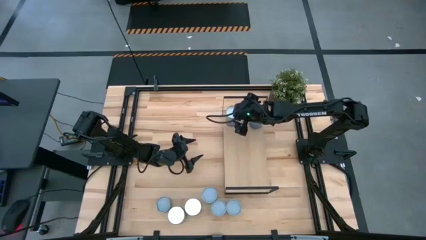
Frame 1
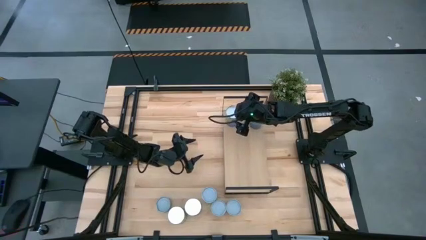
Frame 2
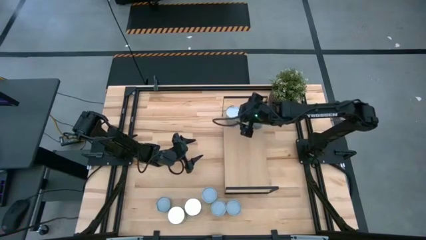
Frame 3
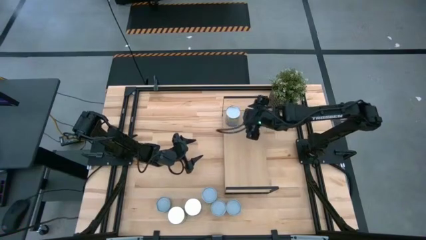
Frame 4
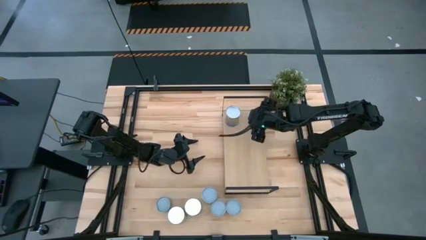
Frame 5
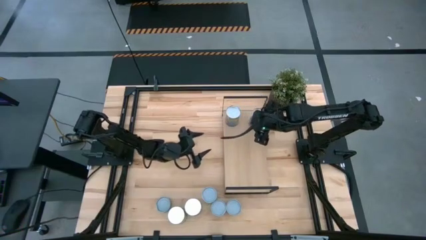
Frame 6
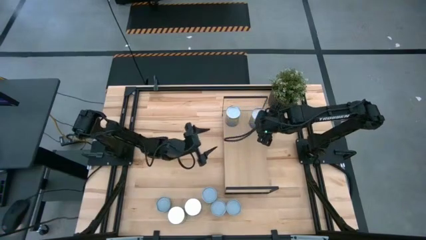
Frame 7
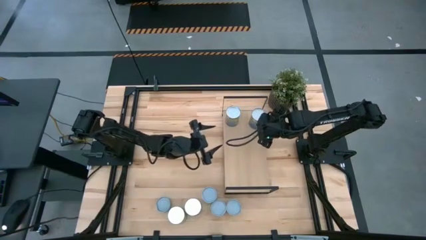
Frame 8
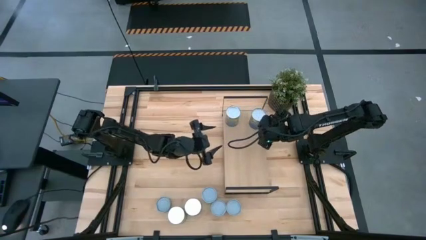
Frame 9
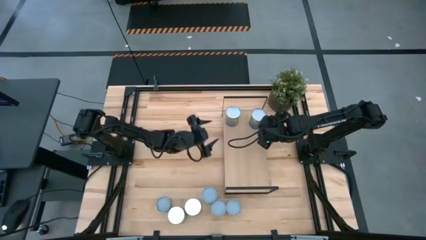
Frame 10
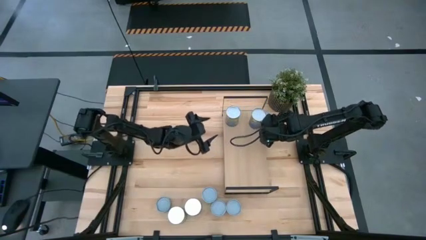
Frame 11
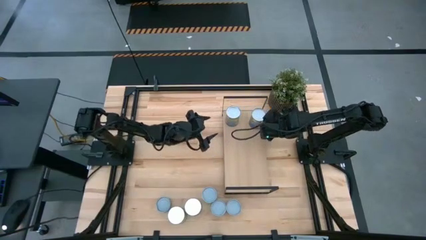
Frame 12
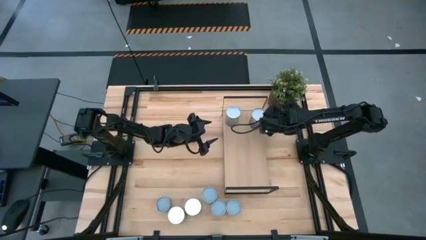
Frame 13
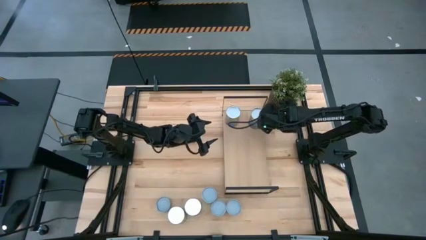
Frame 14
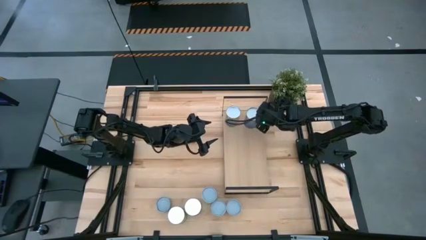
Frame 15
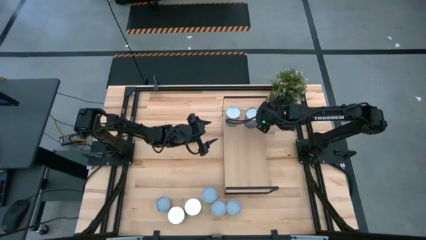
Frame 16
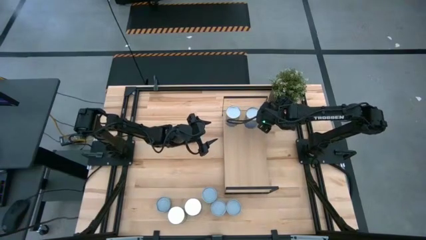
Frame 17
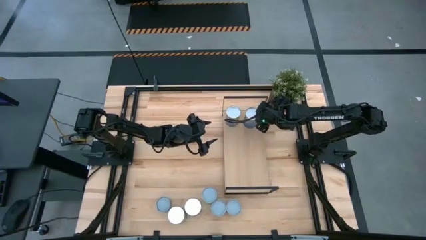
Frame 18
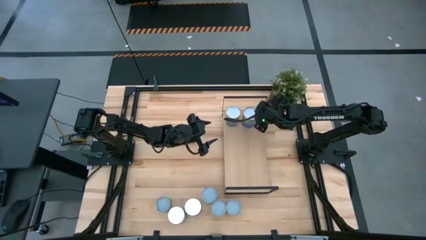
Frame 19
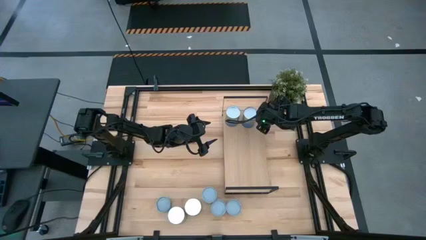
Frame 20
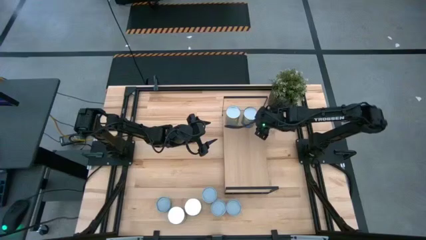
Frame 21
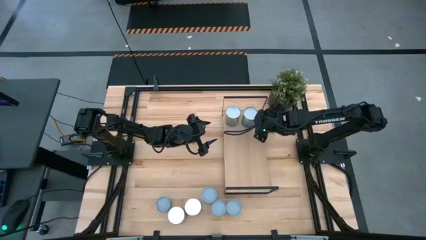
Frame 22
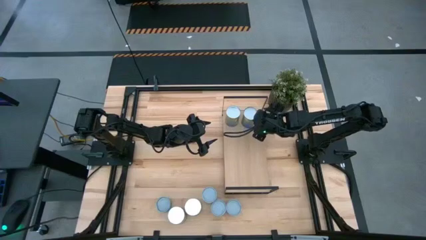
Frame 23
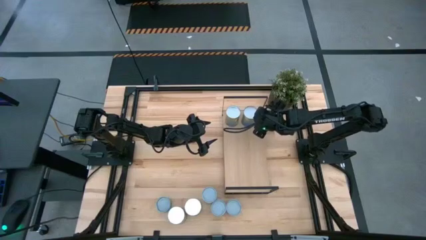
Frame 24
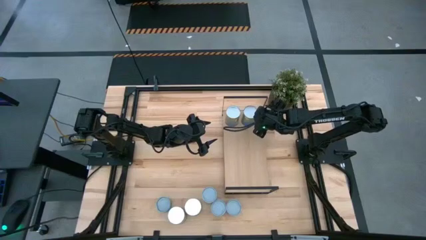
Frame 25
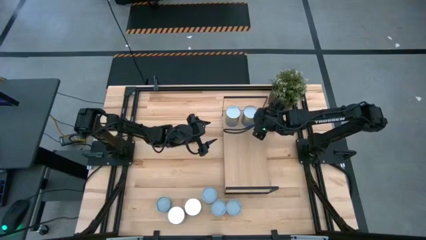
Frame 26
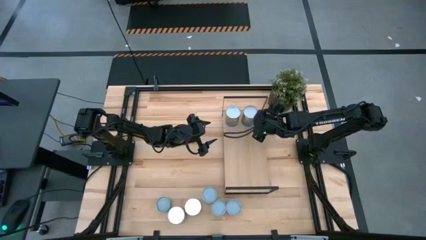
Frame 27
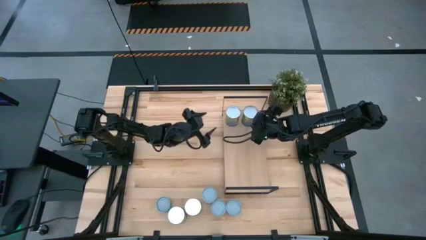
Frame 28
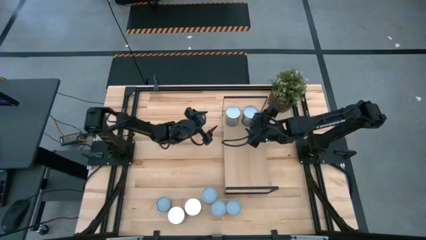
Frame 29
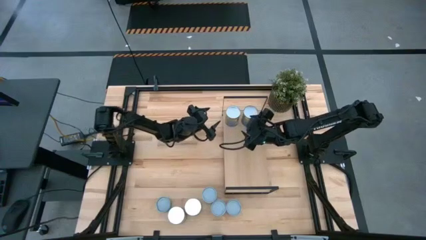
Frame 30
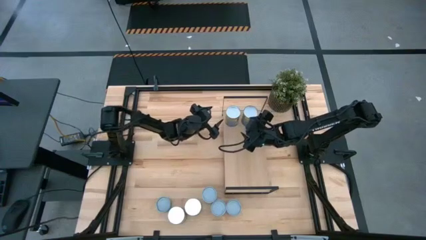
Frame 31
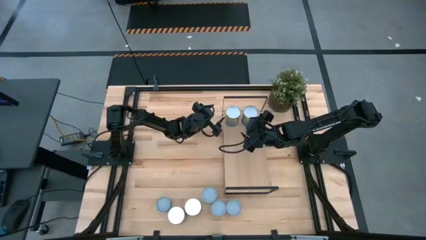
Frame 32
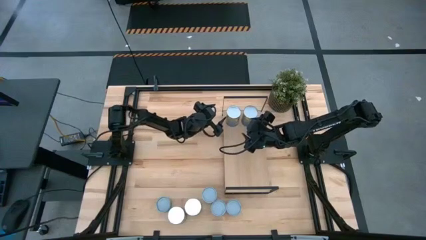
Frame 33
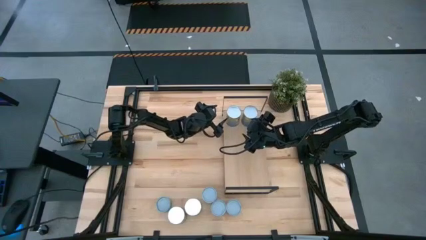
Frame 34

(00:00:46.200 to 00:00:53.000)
Task: Pick and place cans onto a shelf
Adjust the cans on the shelf

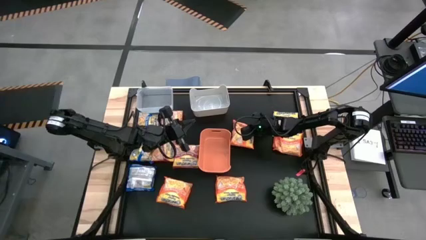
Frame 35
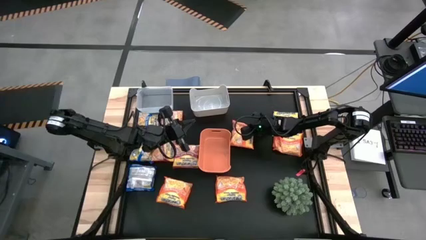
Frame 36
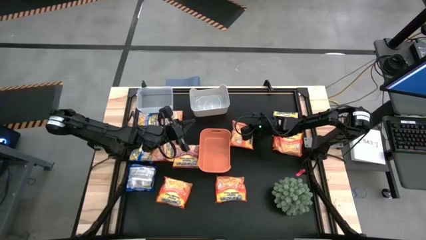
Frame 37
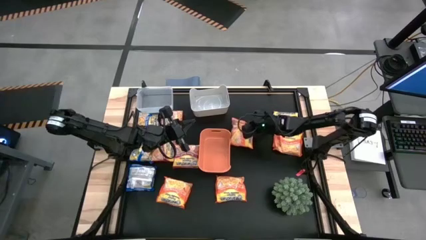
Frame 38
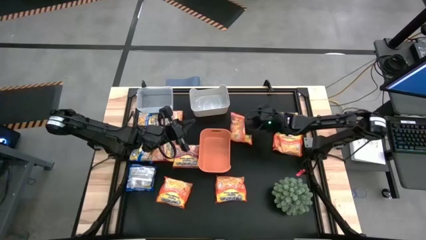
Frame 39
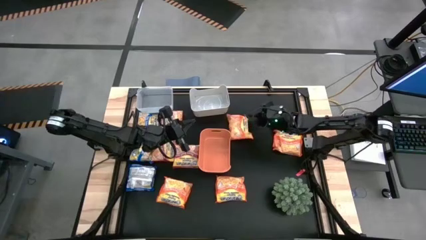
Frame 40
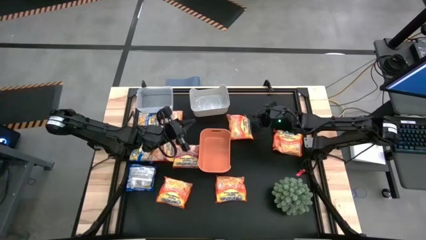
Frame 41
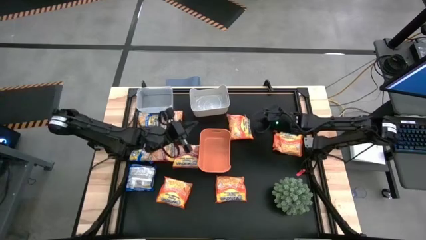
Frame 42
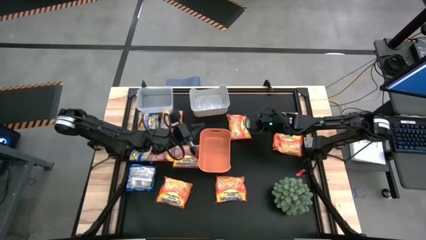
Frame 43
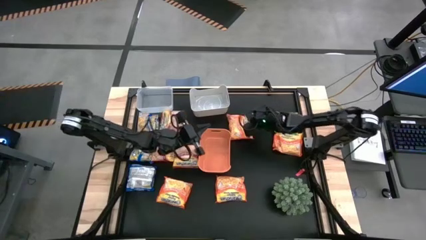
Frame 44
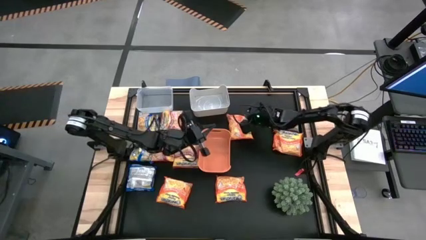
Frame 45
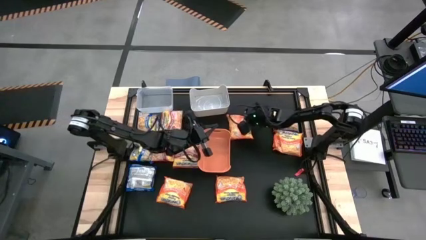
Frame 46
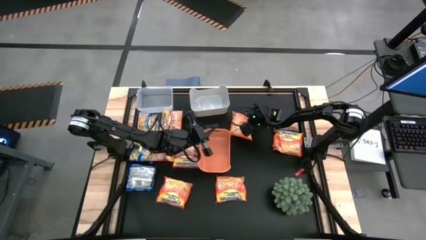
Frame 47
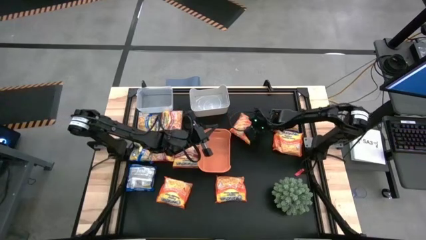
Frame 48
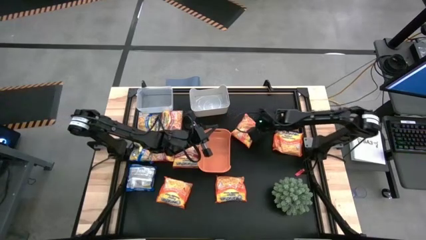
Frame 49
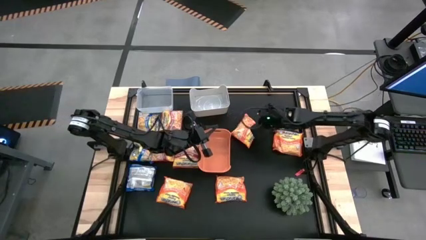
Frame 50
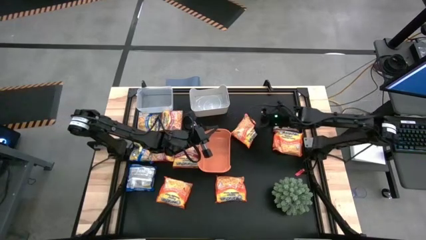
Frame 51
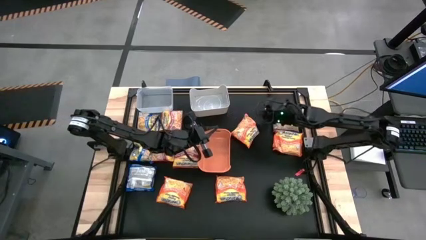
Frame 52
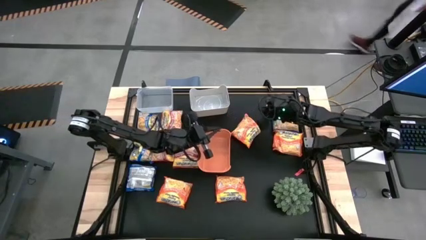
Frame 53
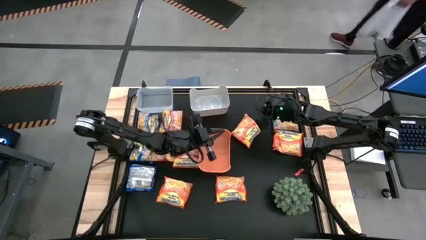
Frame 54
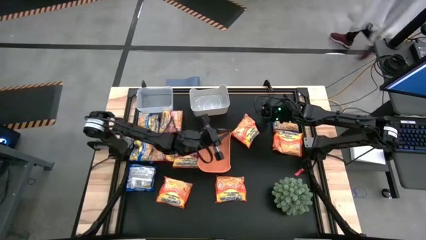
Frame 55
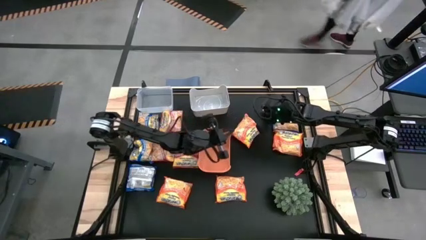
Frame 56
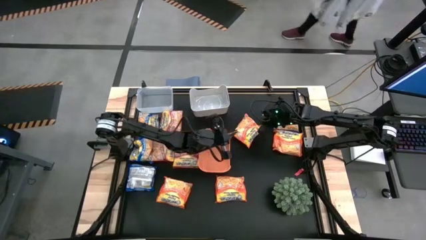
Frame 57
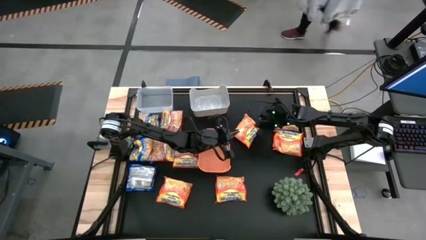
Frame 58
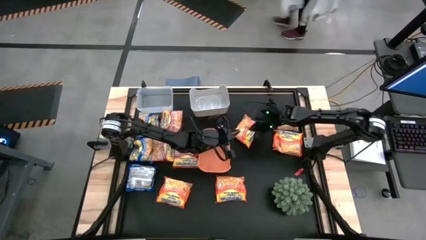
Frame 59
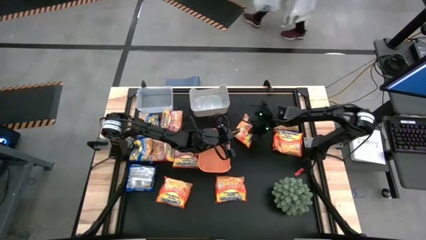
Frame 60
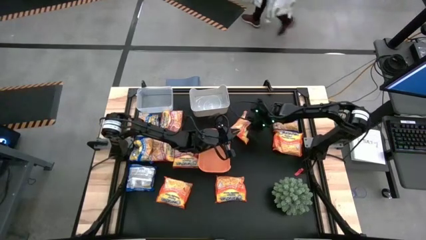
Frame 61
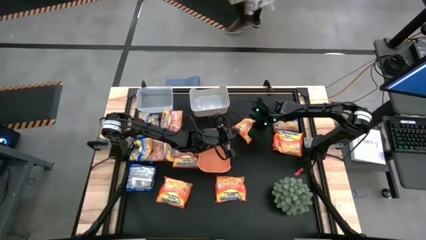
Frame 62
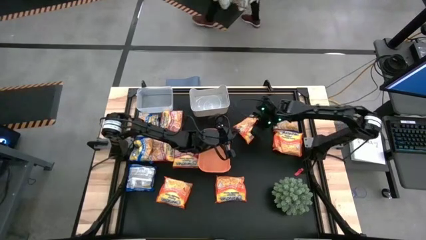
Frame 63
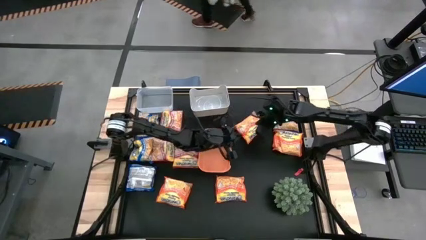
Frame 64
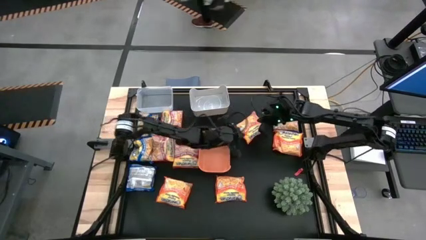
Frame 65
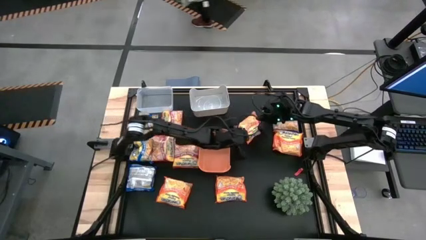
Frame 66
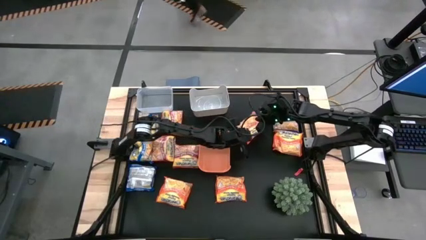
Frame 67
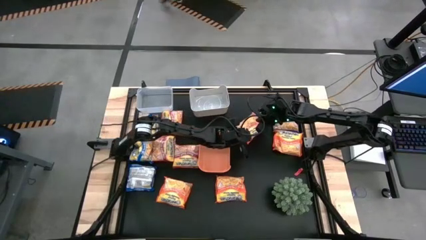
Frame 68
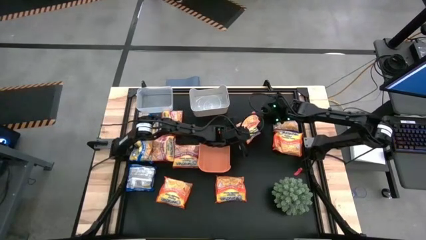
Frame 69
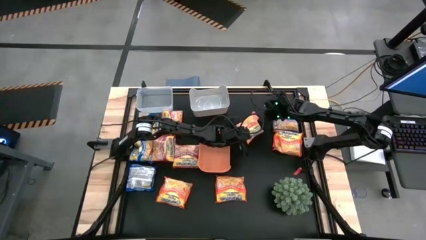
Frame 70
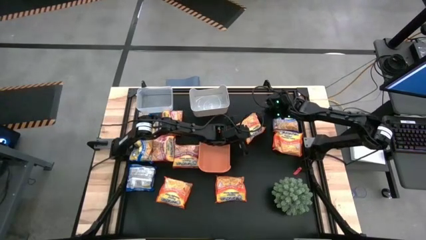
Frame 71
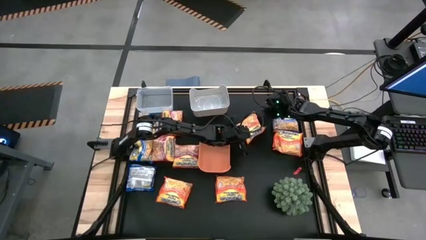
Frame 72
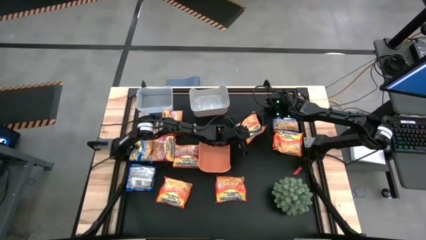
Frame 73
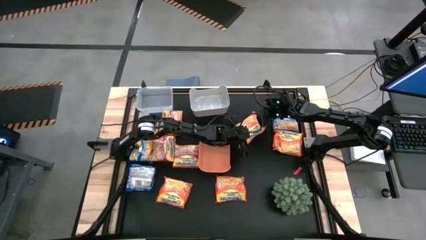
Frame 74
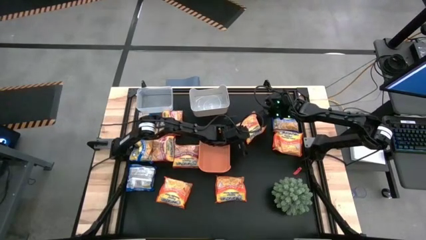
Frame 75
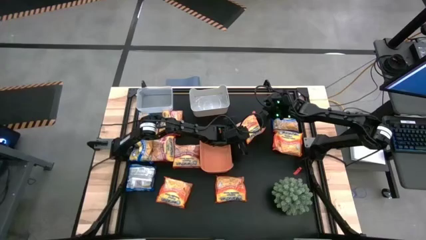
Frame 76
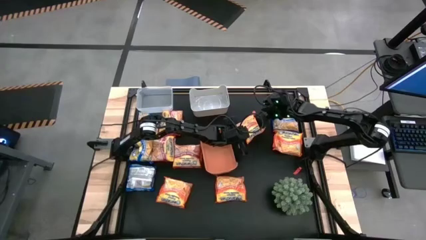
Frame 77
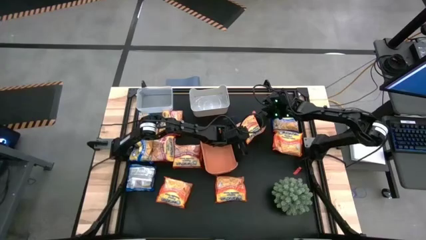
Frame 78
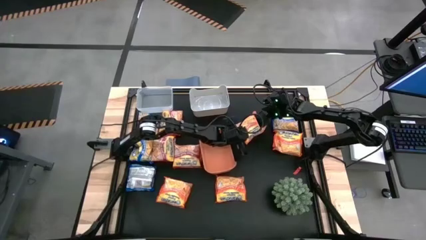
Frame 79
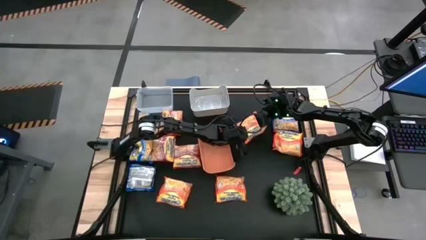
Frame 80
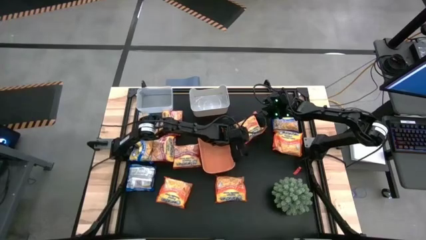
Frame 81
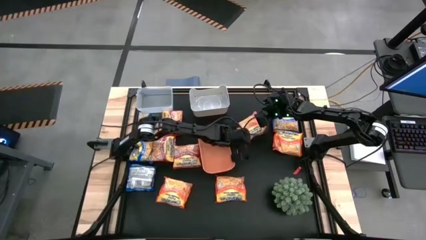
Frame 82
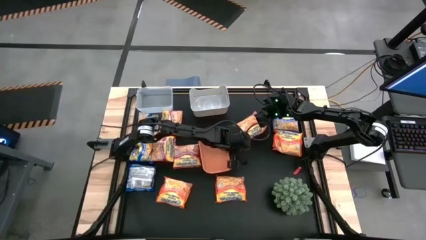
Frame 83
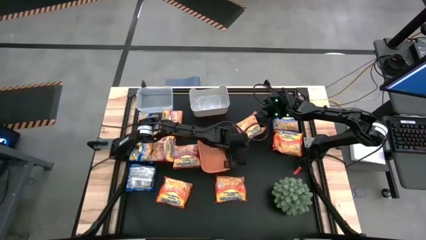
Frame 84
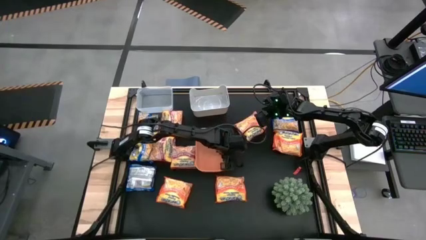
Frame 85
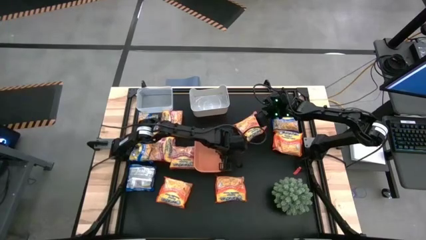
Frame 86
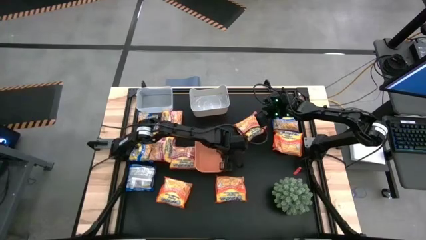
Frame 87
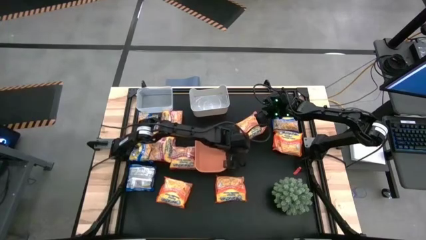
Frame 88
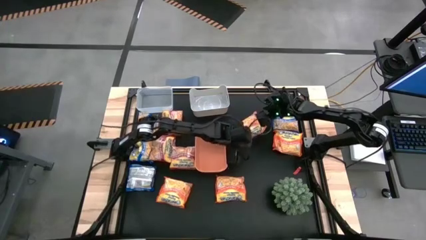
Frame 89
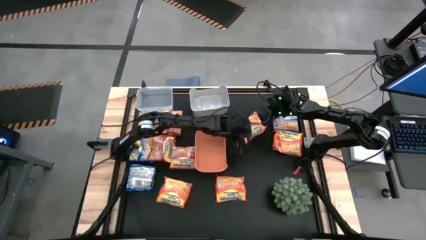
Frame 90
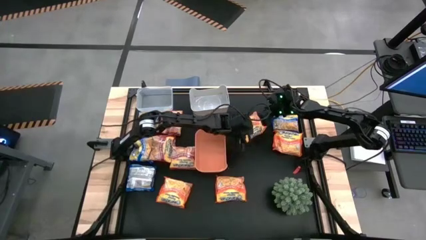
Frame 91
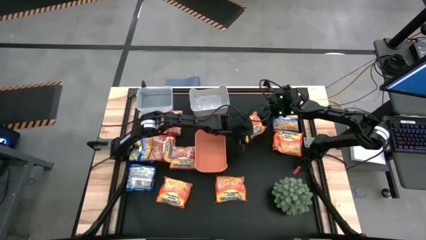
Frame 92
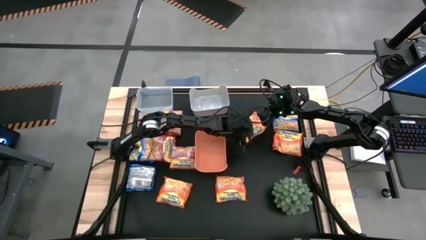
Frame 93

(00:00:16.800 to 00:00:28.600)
Task: Sort Maruchan noodles
Put the orange bag into the white bin
